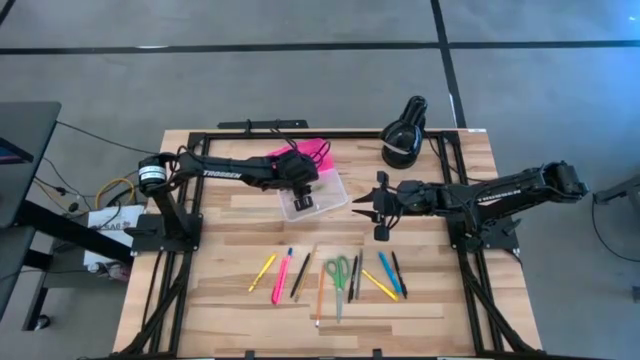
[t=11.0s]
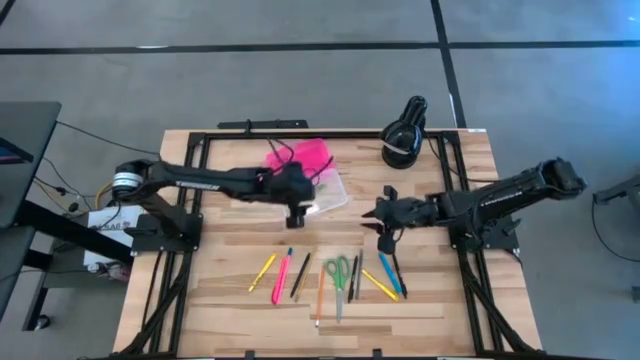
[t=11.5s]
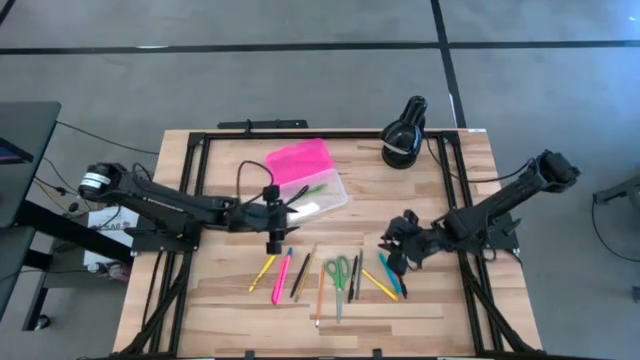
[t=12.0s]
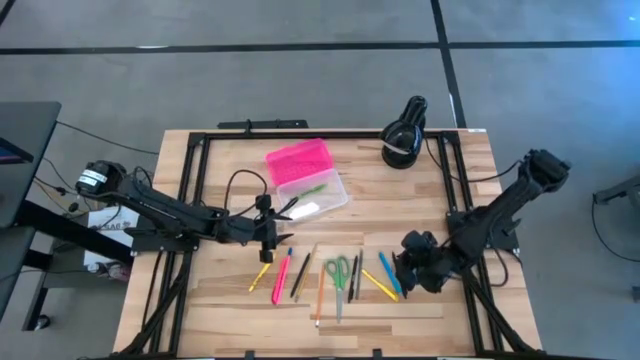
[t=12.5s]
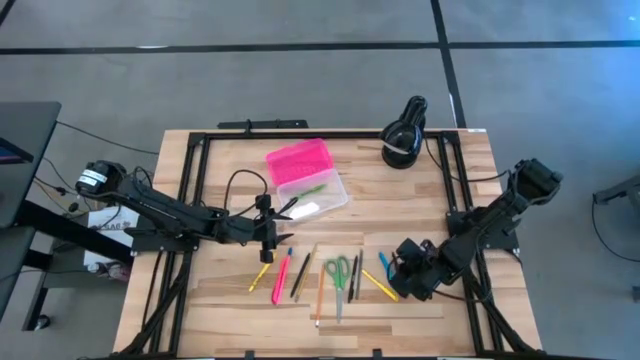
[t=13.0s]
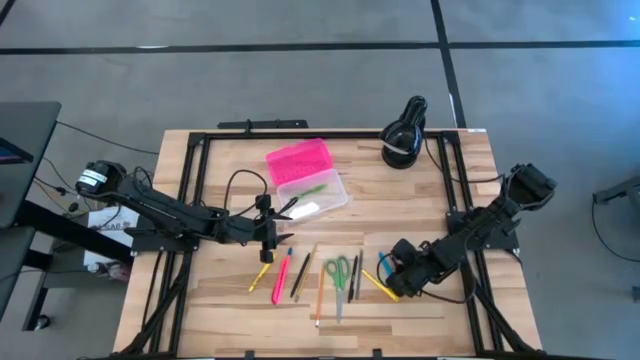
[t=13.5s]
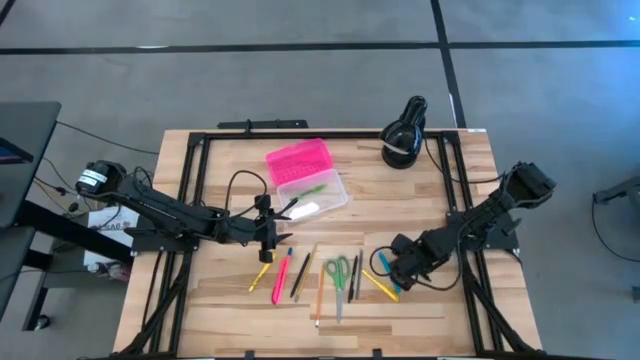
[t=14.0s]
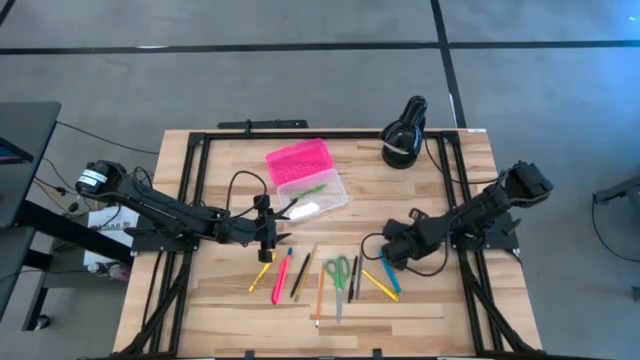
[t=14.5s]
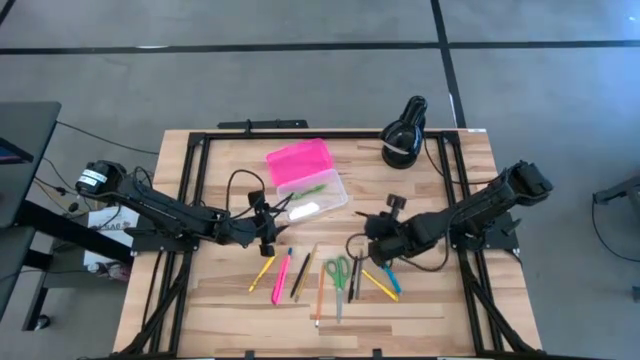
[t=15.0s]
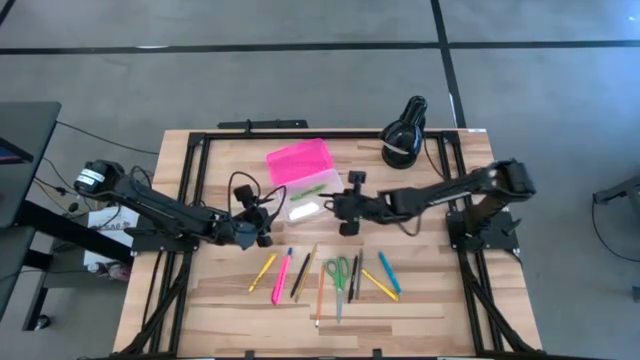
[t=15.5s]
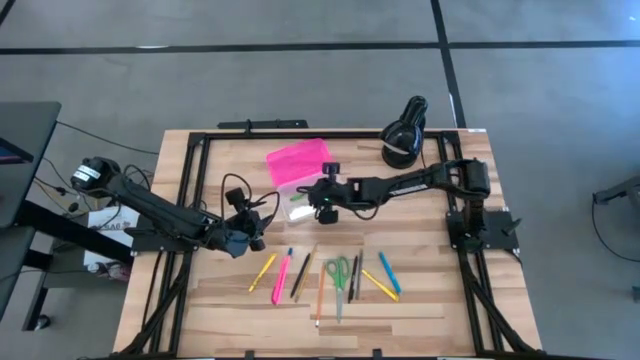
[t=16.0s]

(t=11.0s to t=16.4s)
Task: Pick & place school supplies into a supply box
Put the right black pen into the pink supply box

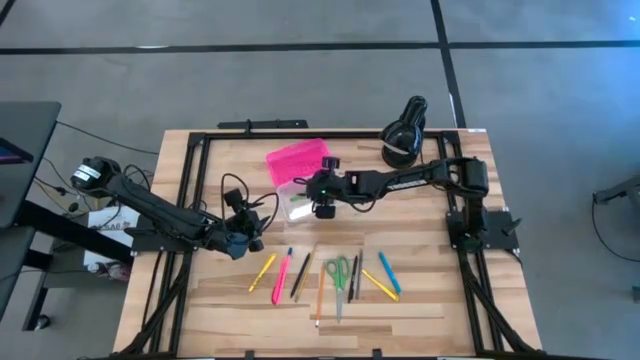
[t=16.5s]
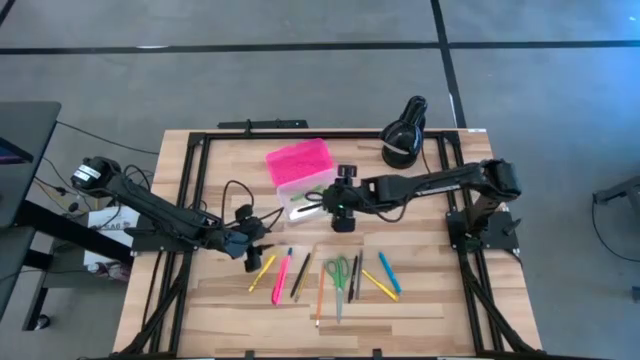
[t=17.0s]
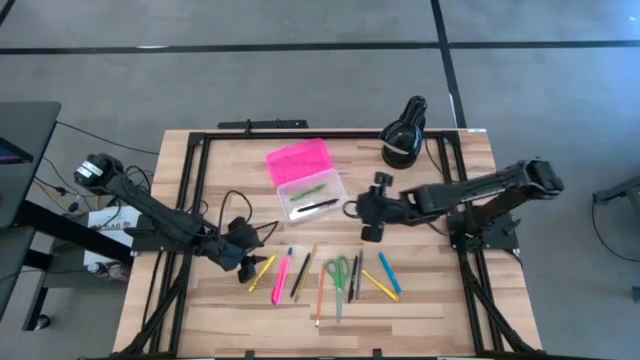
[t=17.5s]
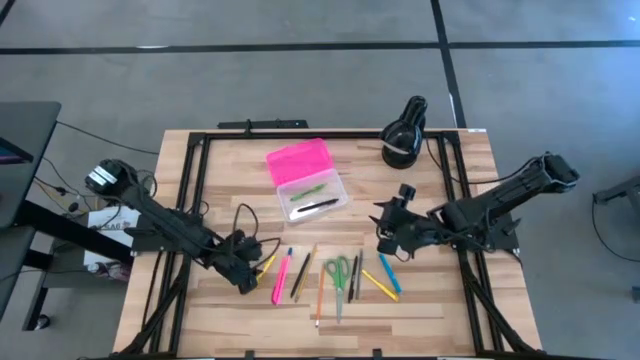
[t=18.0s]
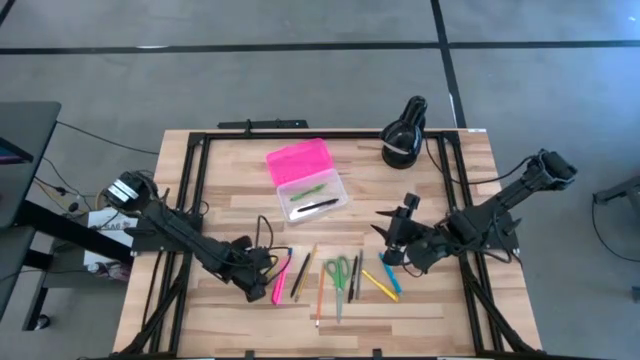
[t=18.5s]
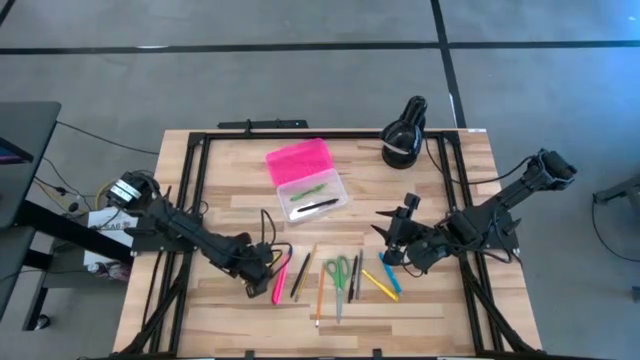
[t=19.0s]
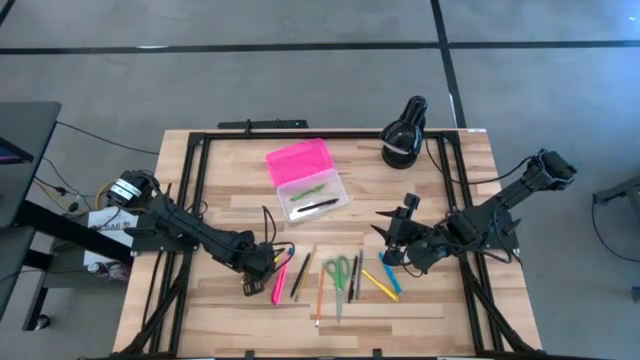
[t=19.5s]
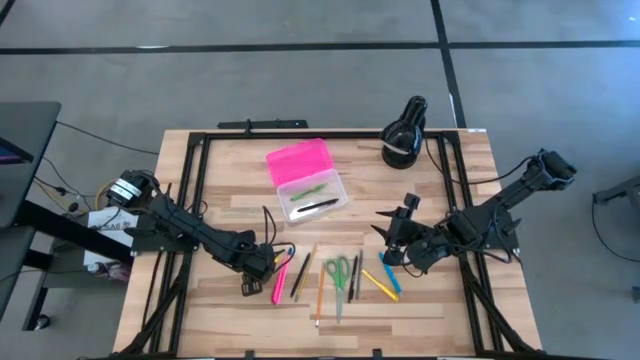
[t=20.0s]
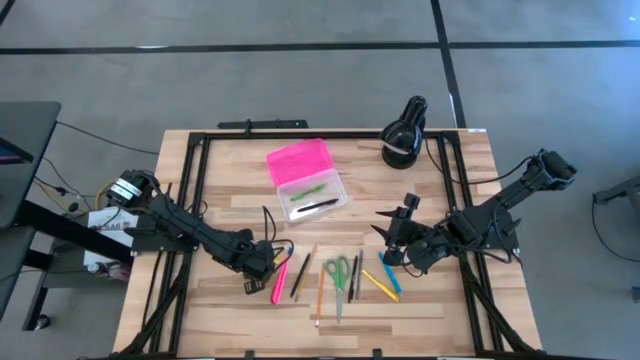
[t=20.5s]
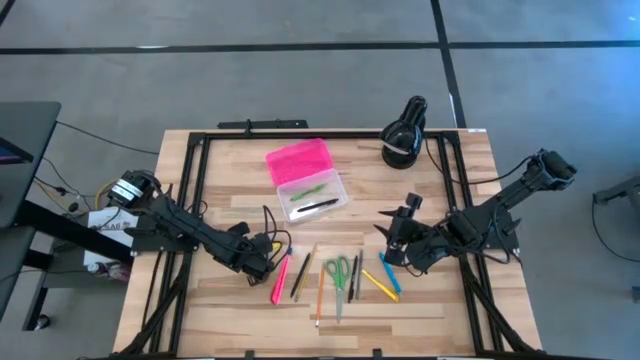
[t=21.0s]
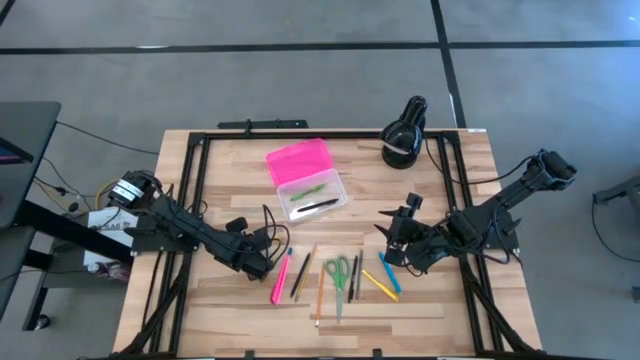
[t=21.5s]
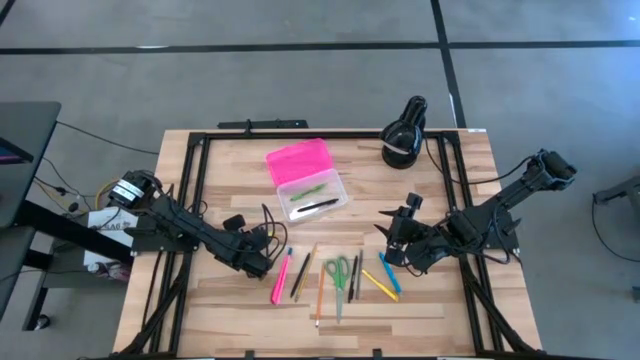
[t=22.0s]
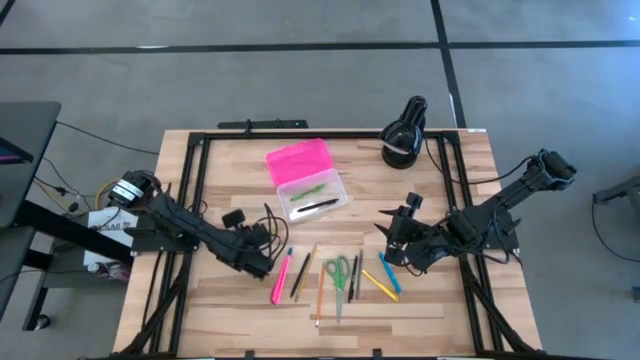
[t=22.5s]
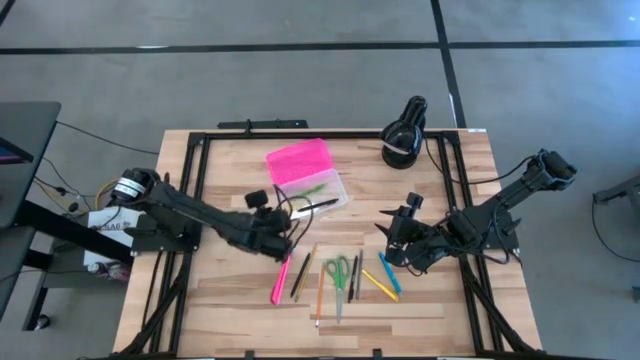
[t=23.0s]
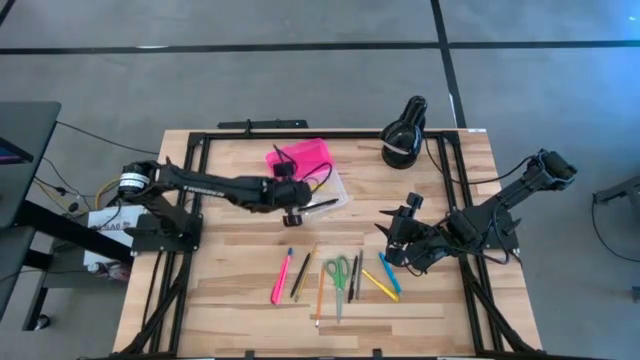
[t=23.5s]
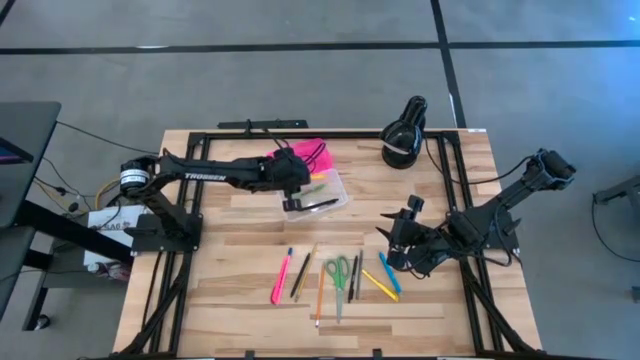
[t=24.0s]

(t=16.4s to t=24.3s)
Put the left yellow pen into the pink supply box

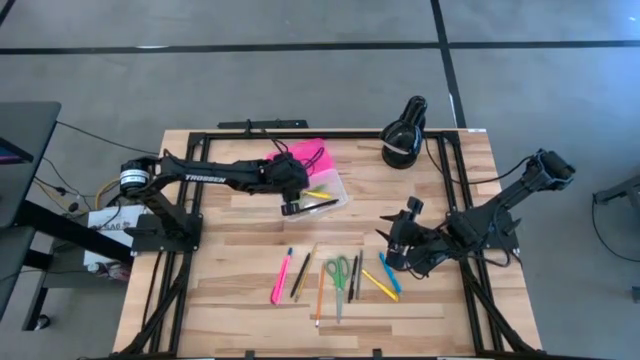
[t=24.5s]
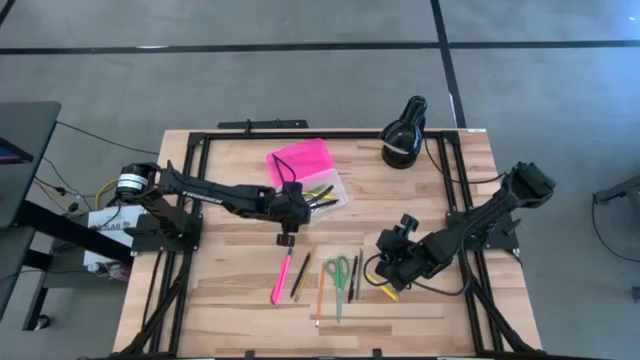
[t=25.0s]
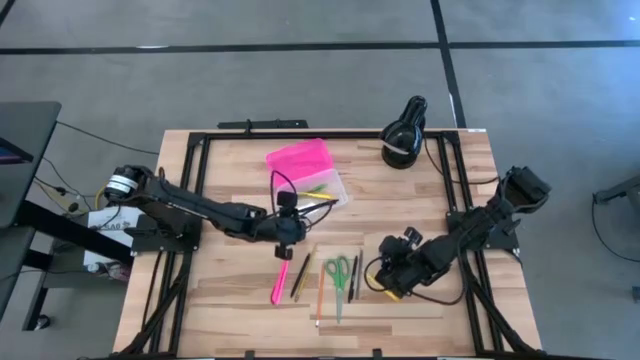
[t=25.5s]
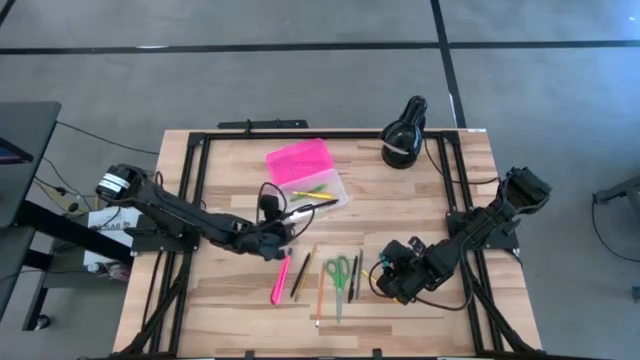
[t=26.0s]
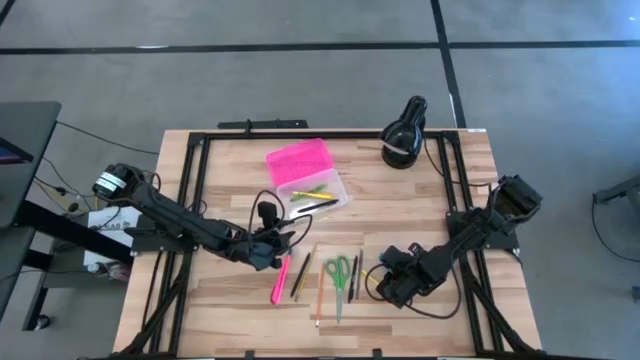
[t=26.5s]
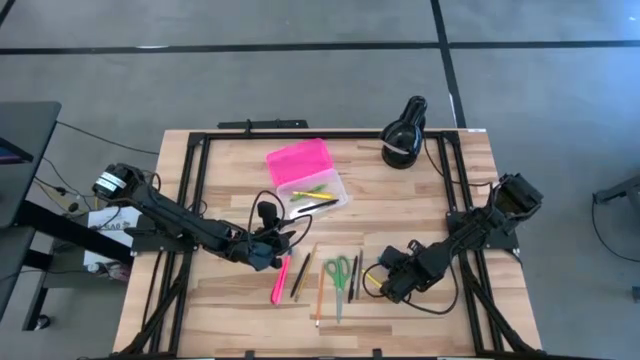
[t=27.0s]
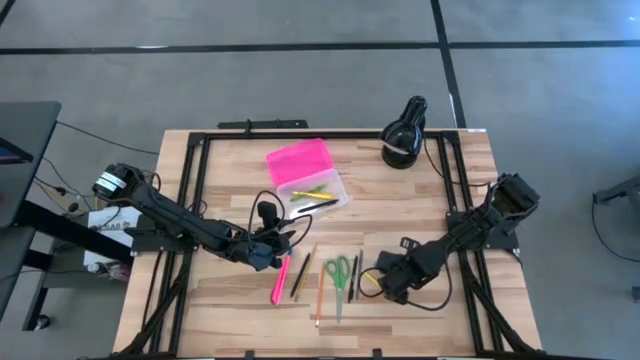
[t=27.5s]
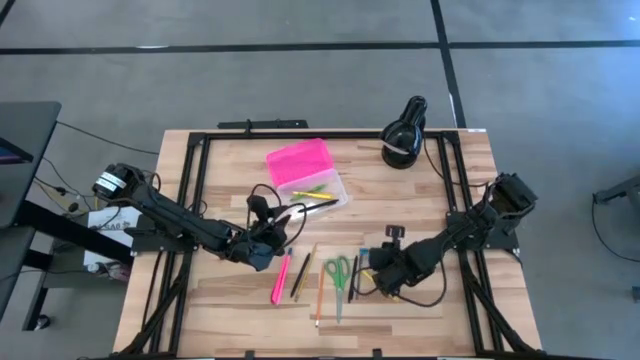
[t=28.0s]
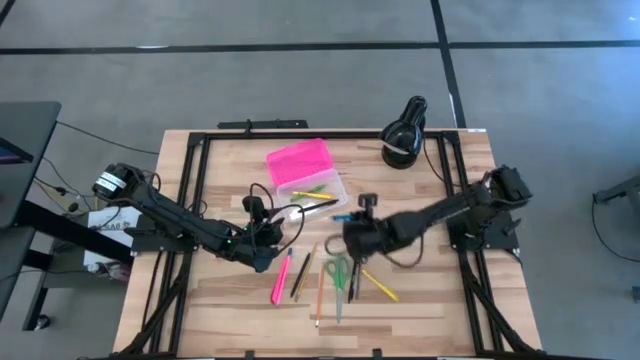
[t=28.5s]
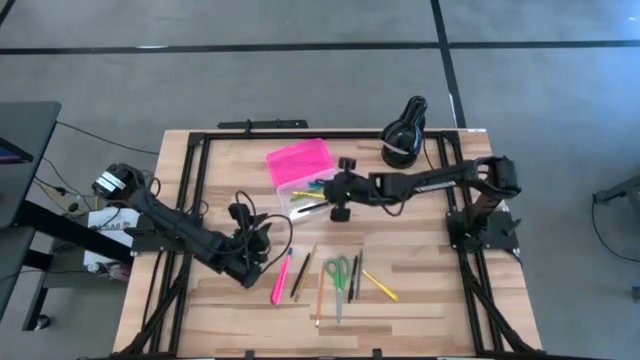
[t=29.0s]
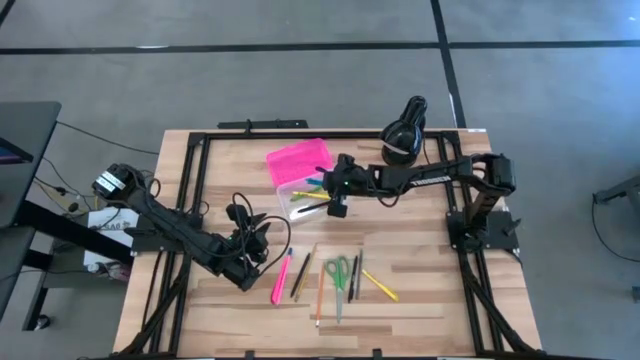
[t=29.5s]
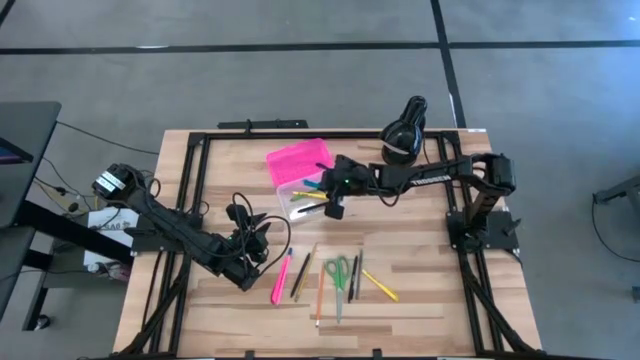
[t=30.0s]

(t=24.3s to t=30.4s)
Put the blue pen into the pink supply box

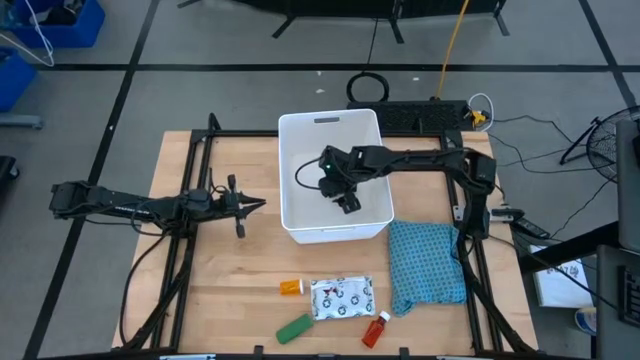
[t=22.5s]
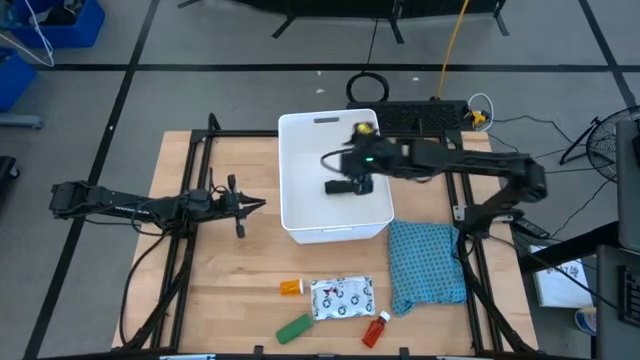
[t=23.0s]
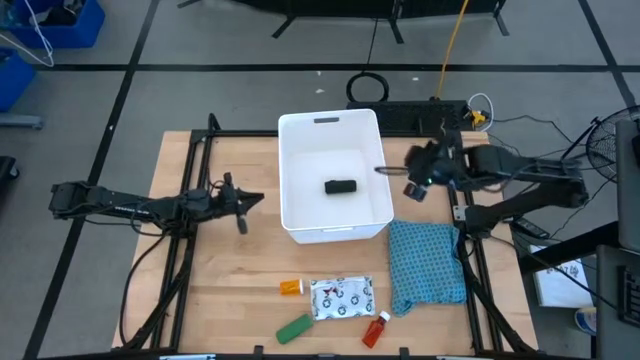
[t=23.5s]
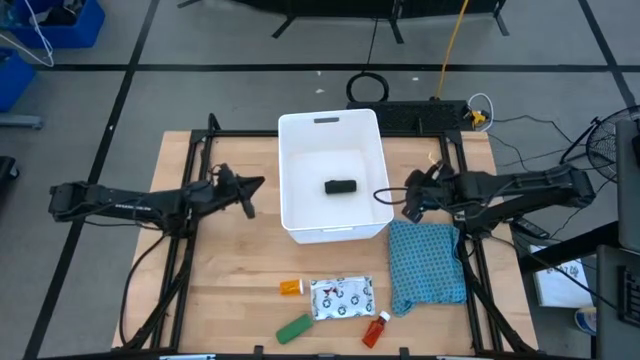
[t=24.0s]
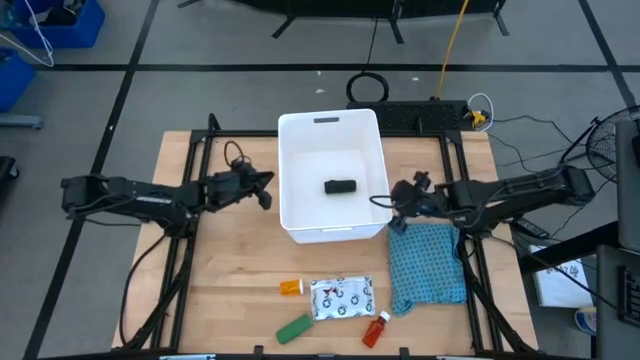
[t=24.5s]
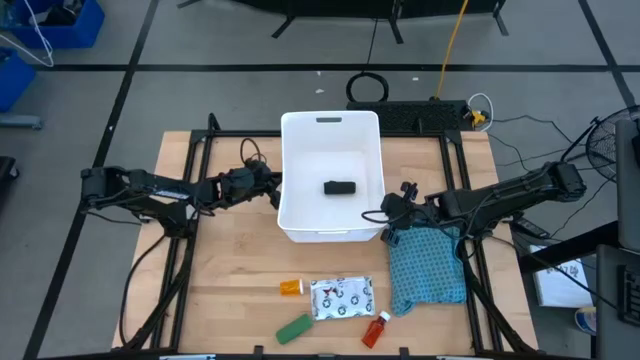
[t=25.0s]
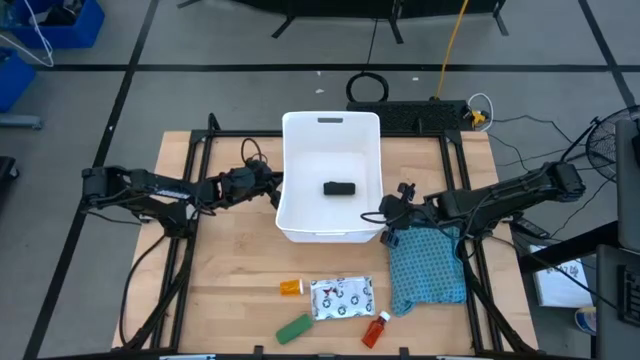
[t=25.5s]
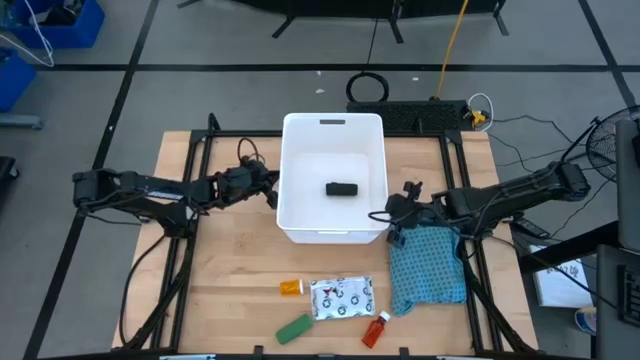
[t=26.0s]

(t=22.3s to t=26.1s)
Task: Pick & place medical supplies in basket/bin
Adjust the white bin
